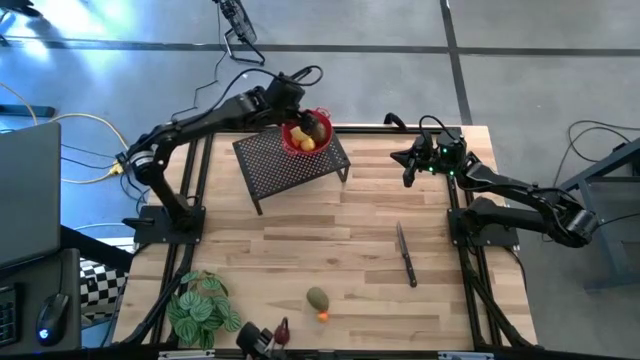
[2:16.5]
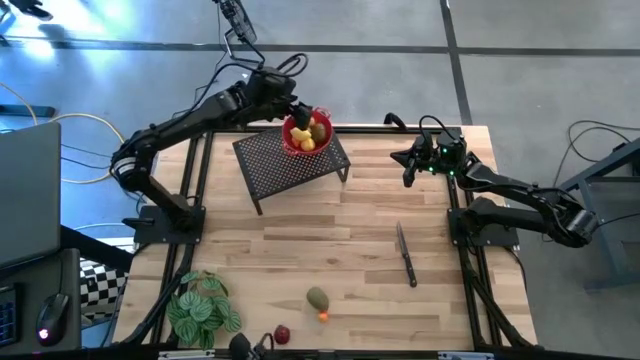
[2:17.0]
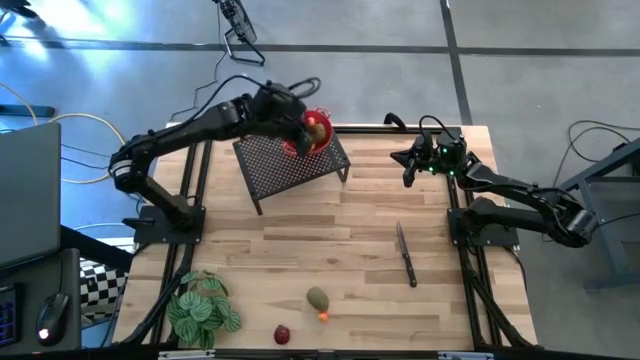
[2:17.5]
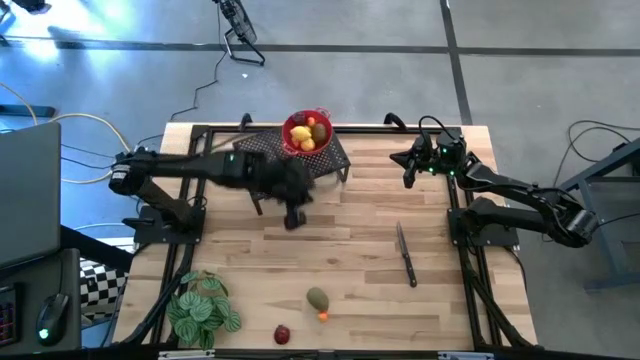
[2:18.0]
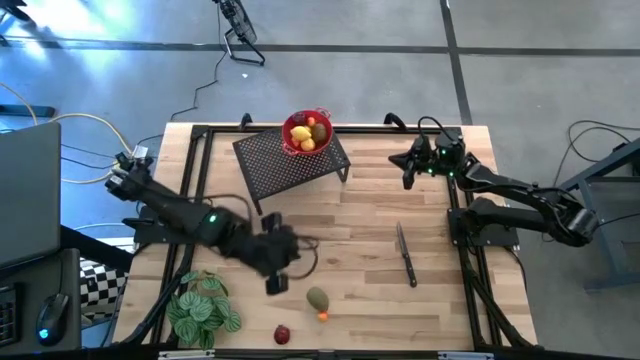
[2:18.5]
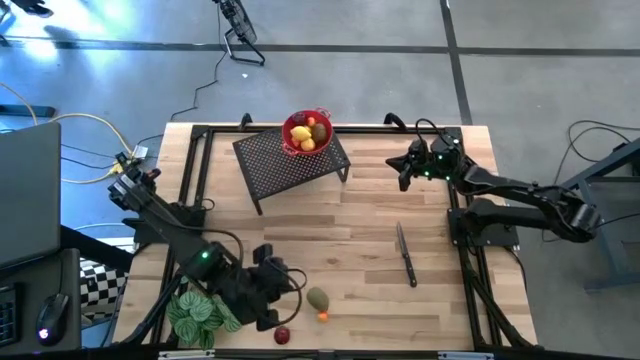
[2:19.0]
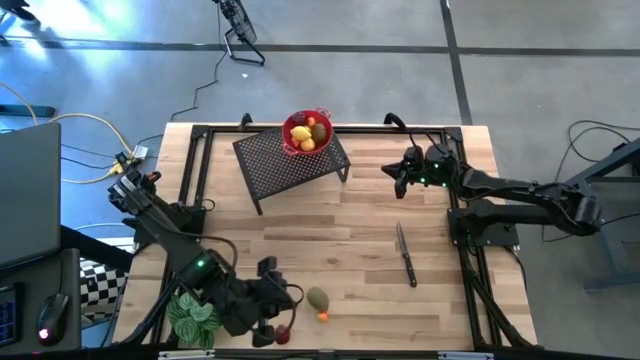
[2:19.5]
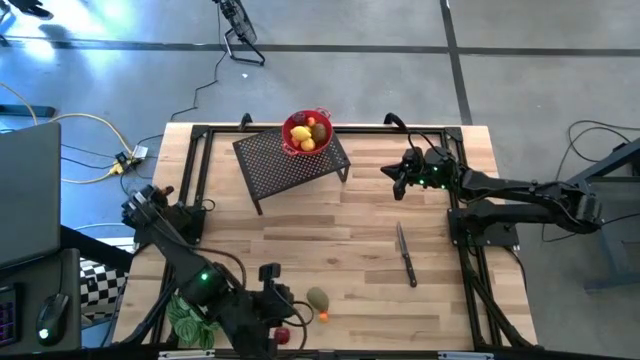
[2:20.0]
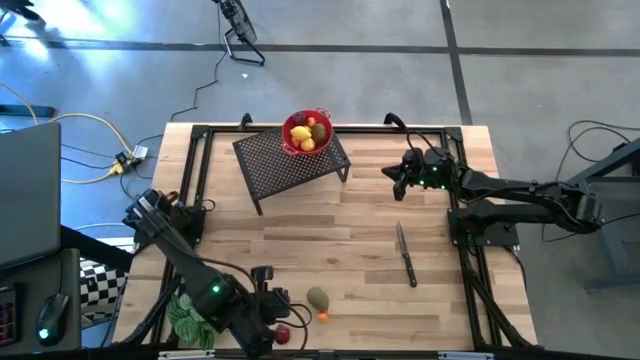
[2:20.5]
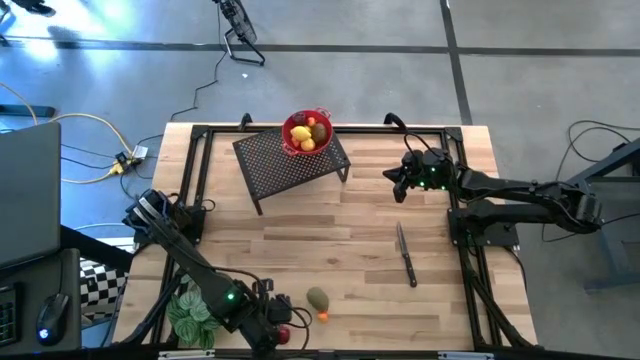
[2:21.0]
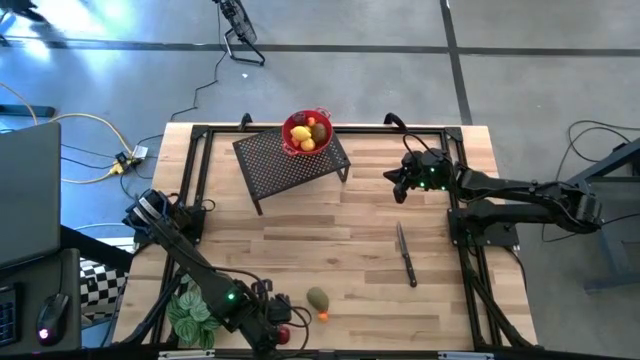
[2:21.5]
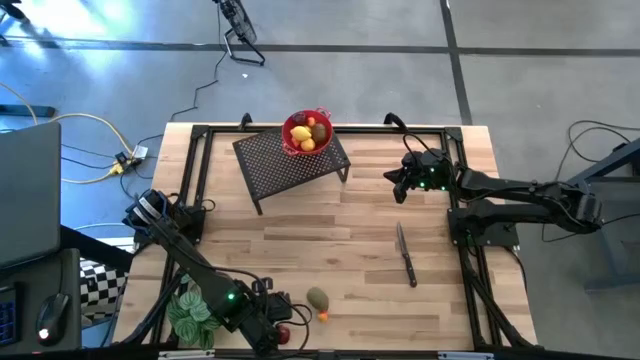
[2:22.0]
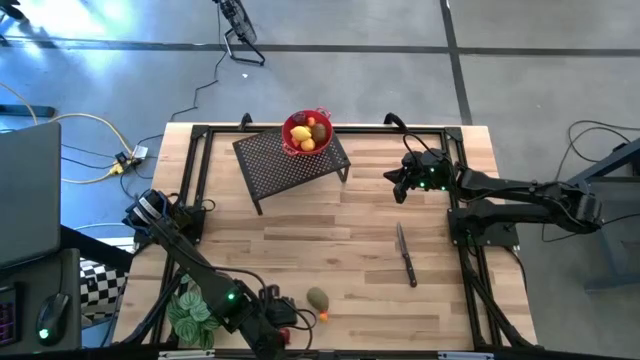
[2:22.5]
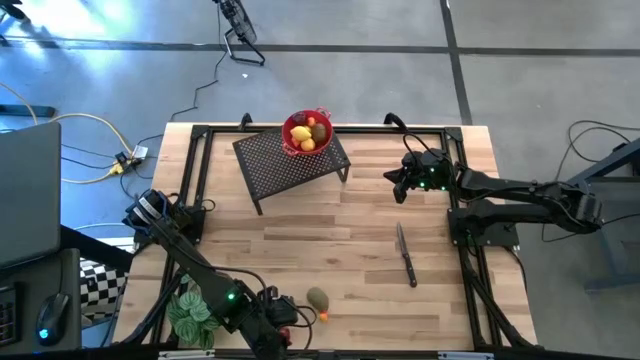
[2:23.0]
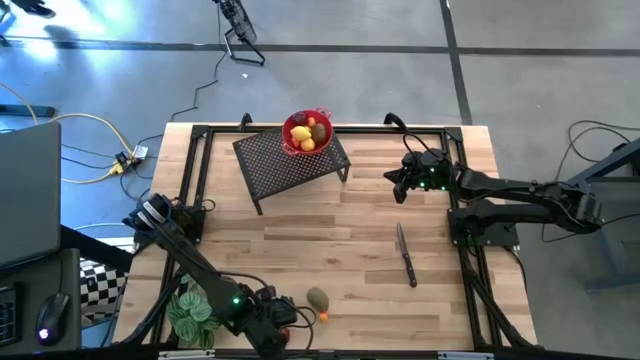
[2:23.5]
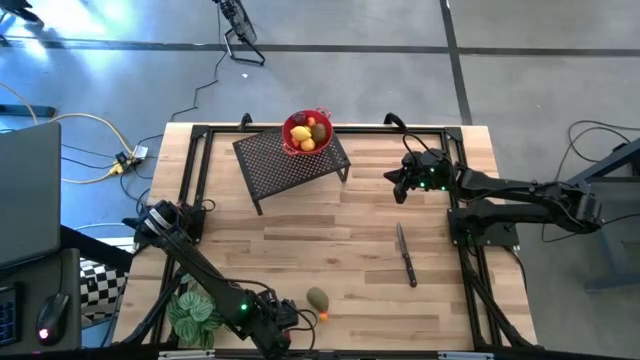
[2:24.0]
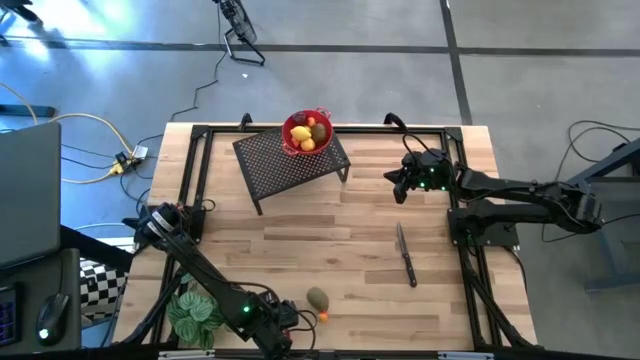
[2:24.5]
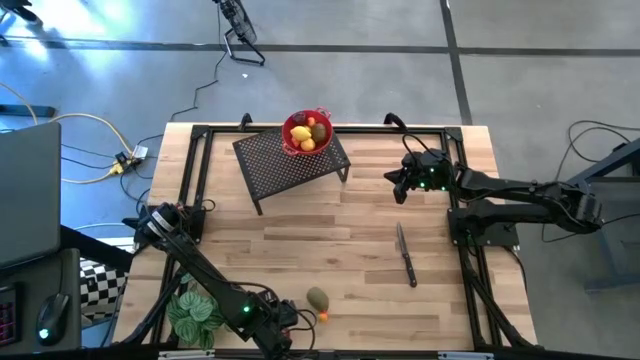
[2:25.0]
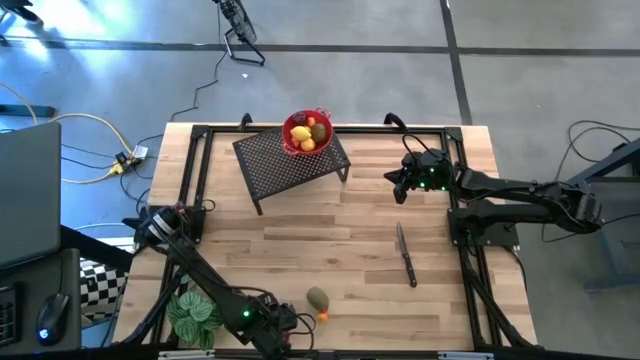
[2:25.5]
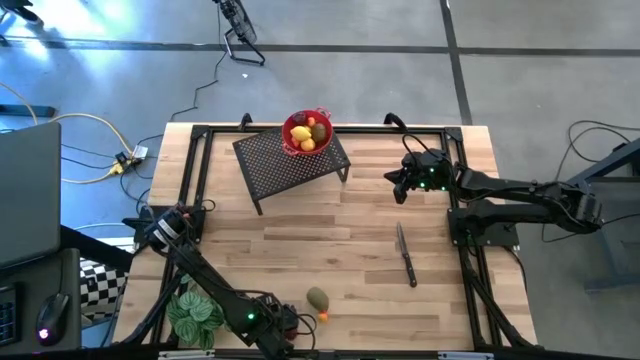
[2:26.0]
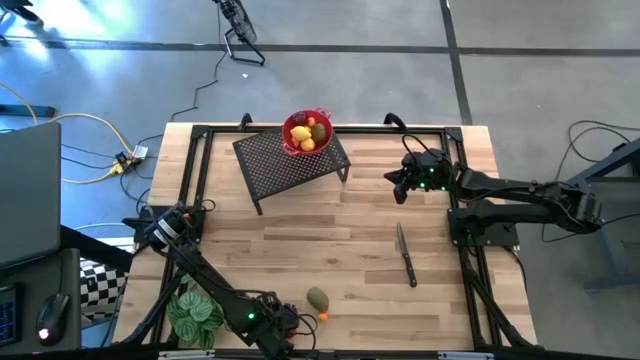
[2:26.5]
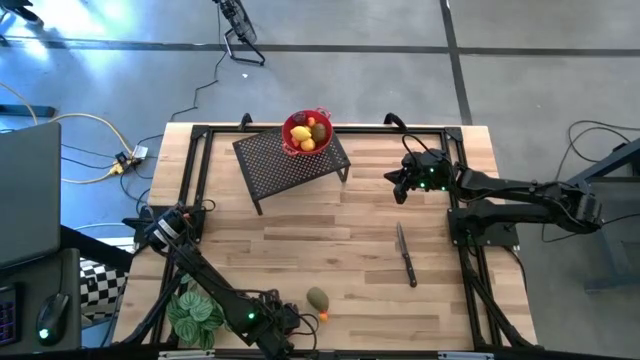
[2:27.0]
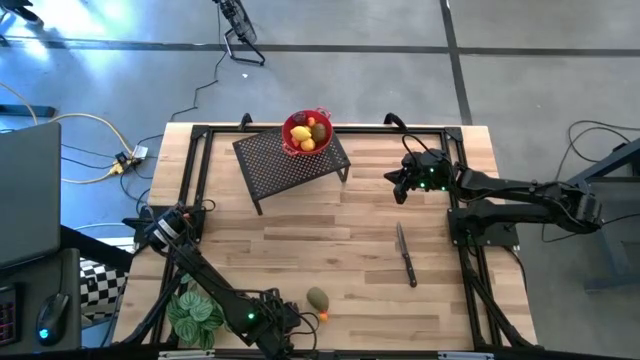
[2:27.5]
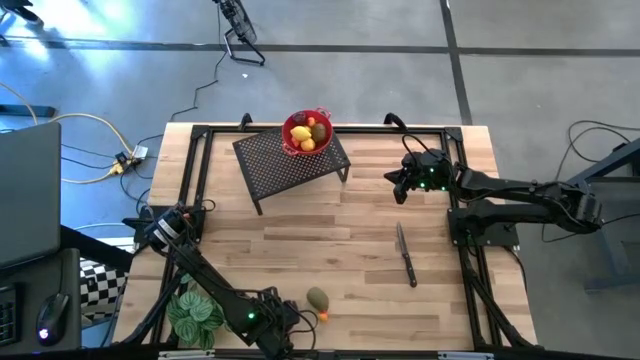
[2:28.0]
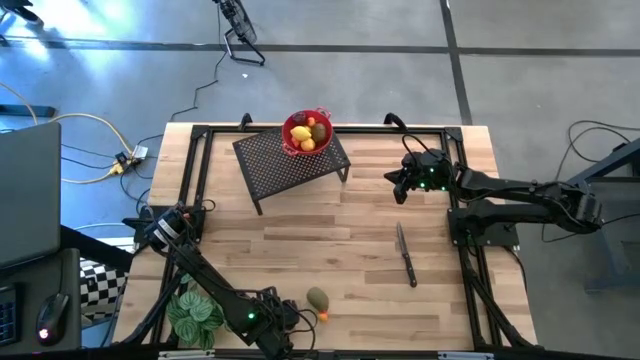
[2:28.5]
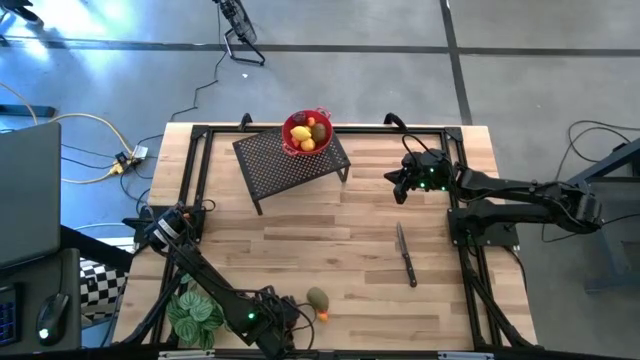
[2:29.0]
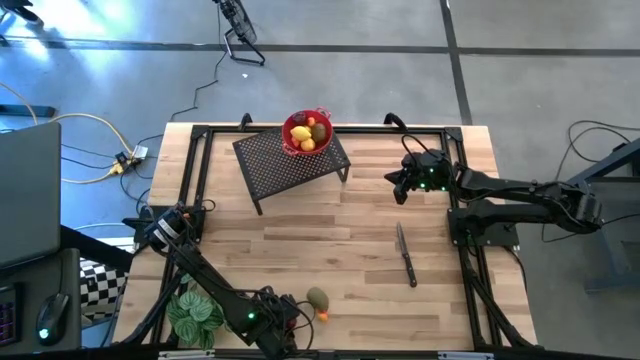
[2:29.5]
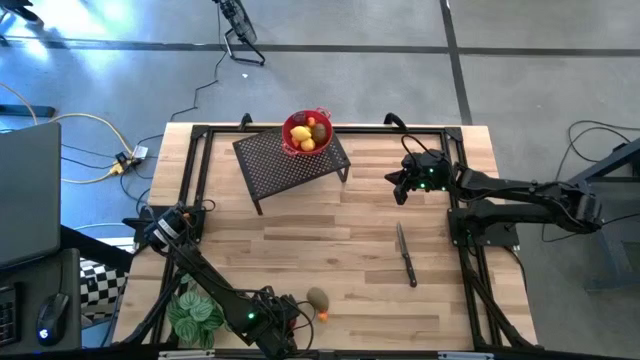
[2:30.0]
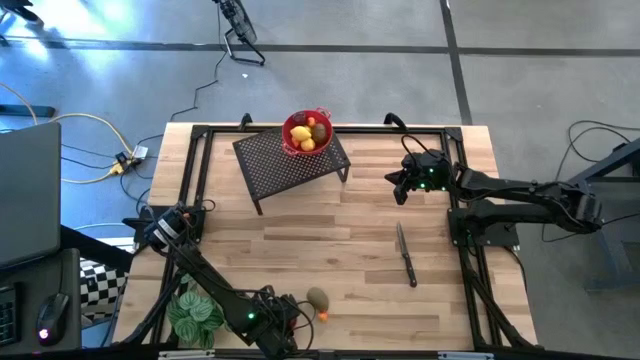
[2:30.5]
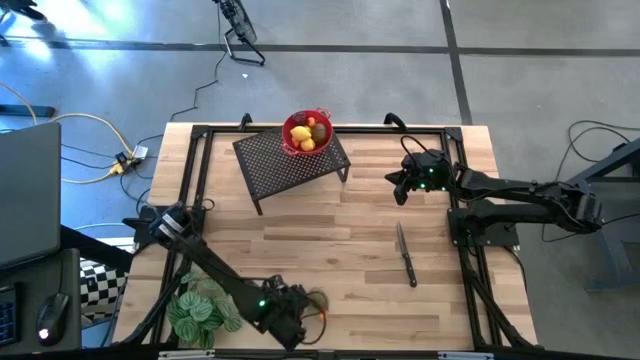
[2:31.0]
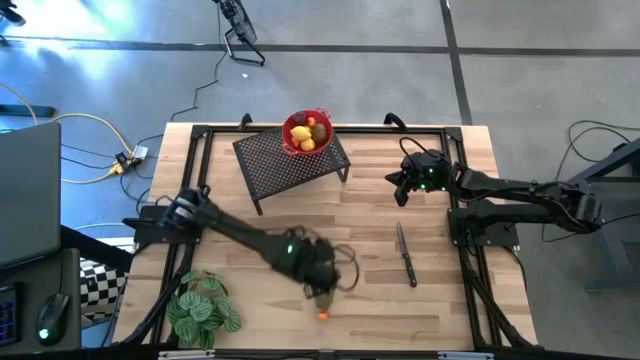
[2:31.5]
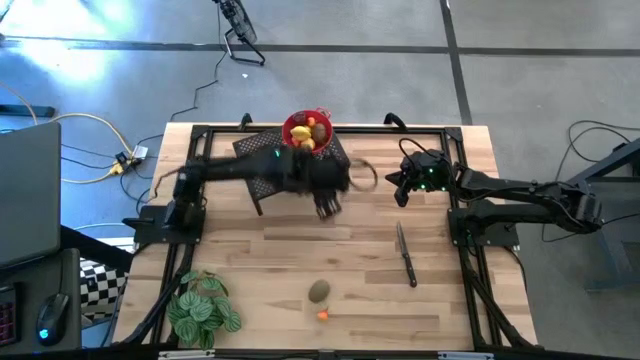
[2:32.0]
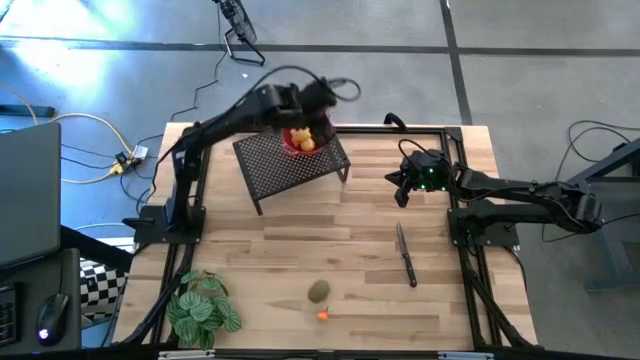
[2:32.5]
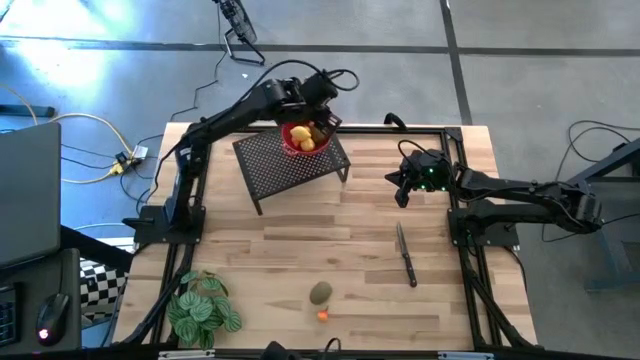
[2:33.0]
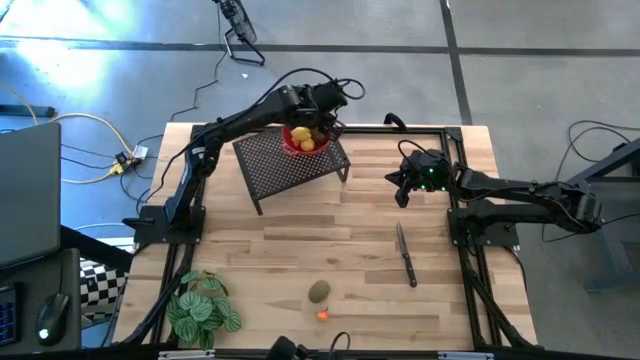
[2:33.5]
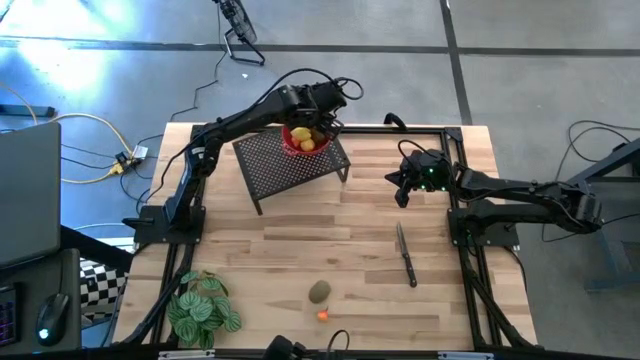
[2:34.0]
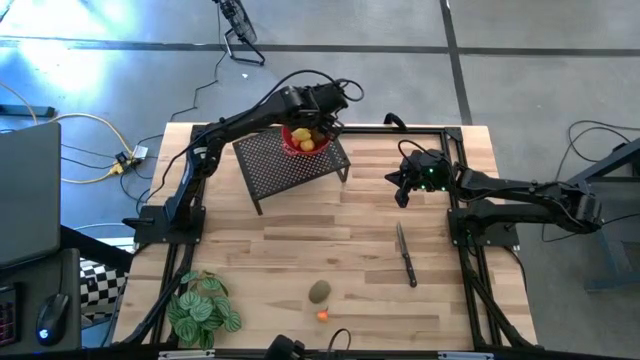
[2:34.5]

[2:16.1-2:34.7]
Task: Pick & Place Fruit
Put the pomegranate into the red strainer bowl on the shelf

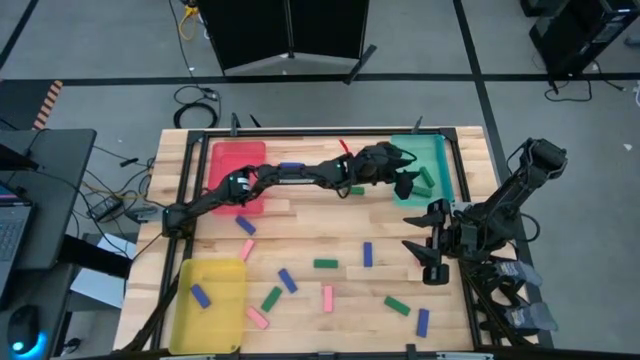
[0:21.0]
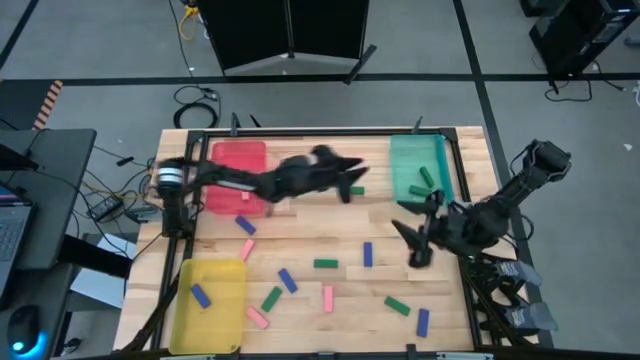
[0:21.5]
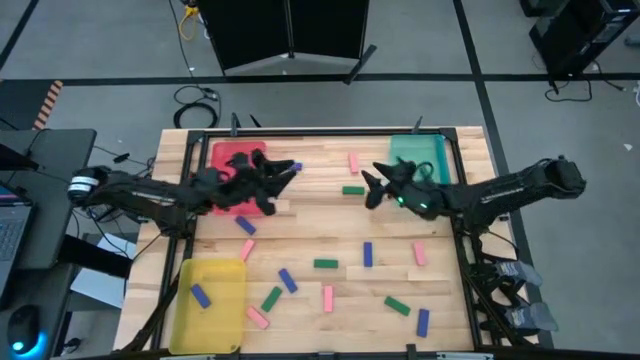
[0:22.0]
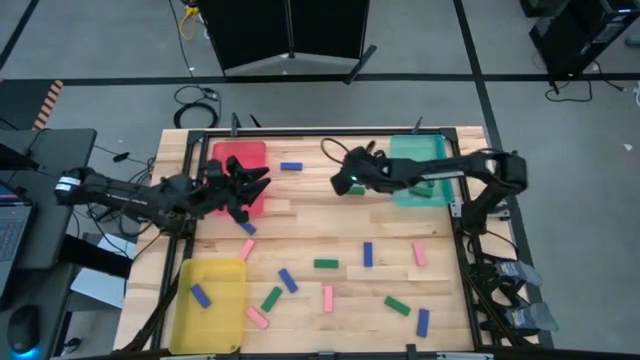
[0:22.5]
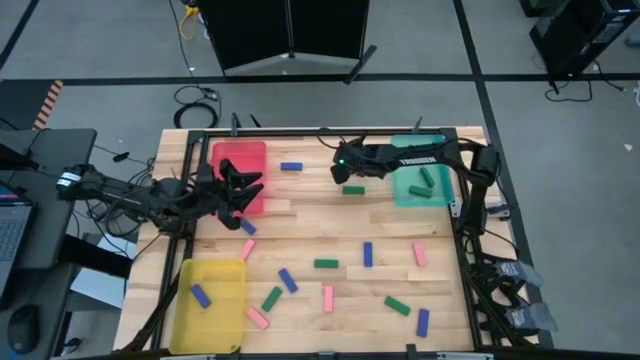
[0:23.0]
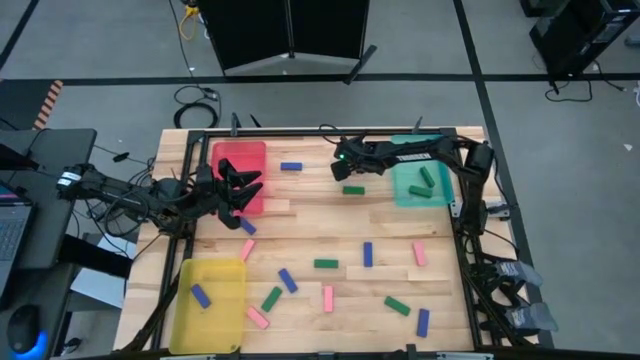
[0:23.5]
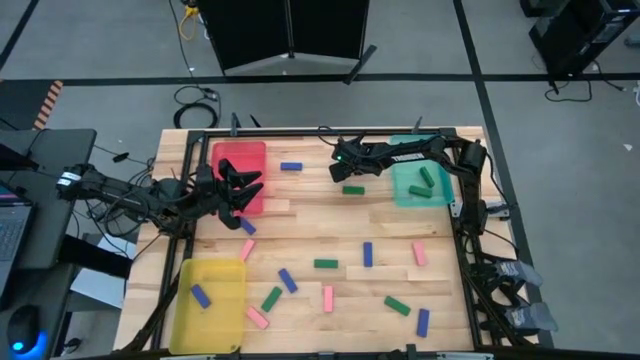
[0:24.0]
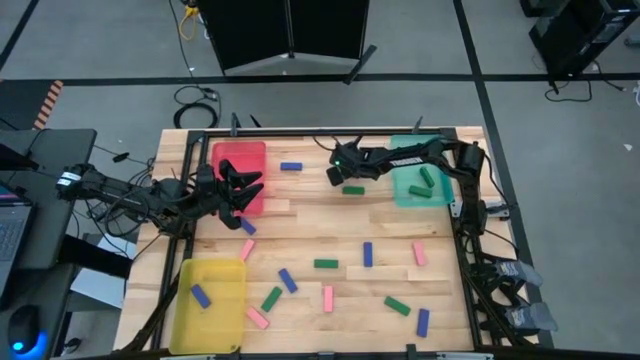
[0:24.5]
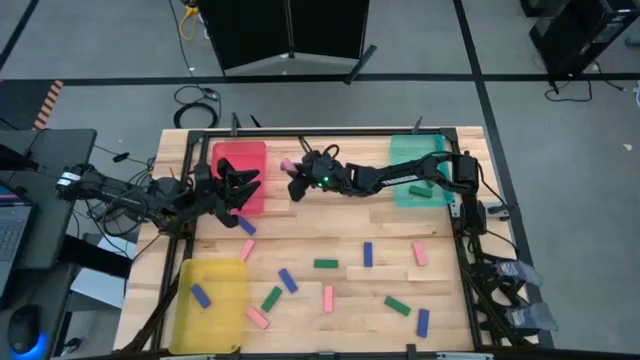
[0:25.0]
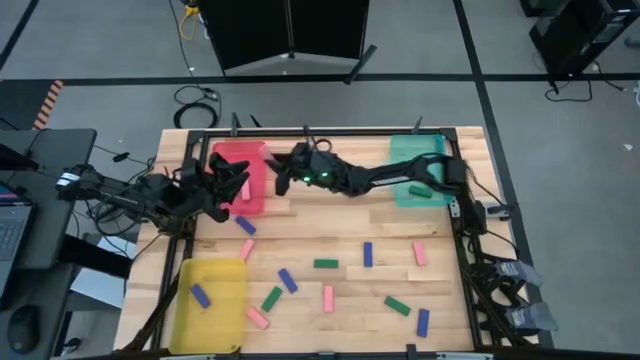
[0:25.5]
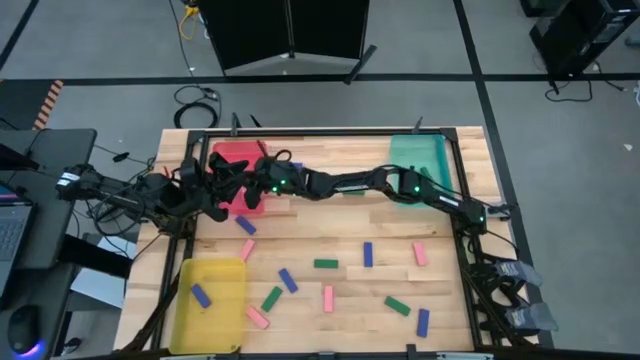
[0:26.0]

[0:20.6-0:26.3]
Task: Sort blocks
Put the pink block into the red bin
